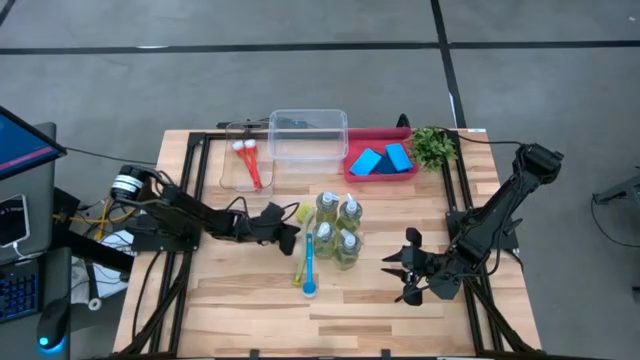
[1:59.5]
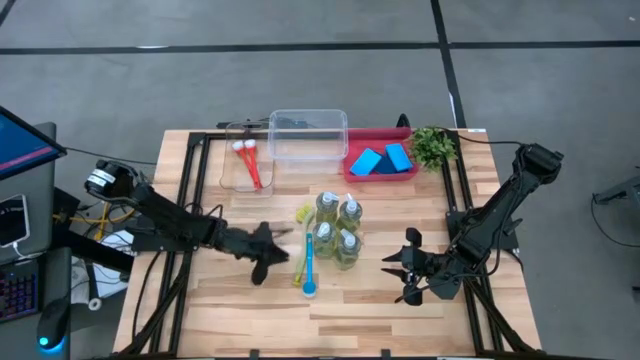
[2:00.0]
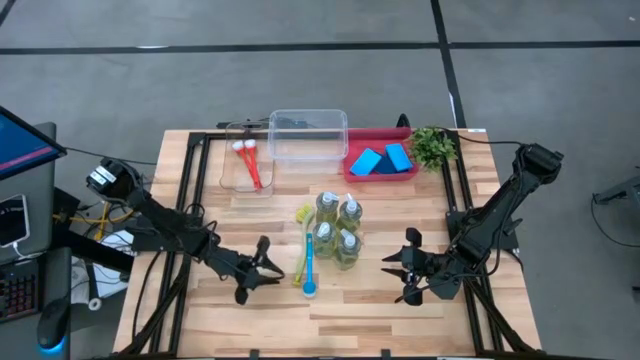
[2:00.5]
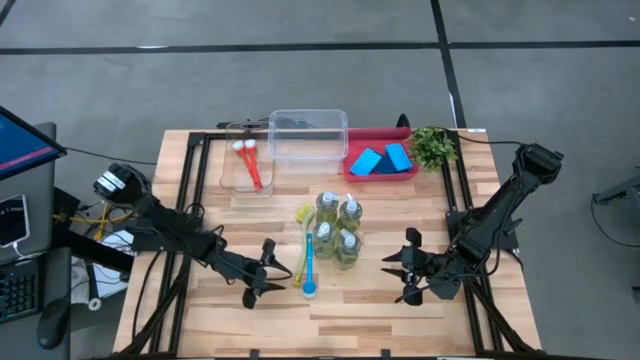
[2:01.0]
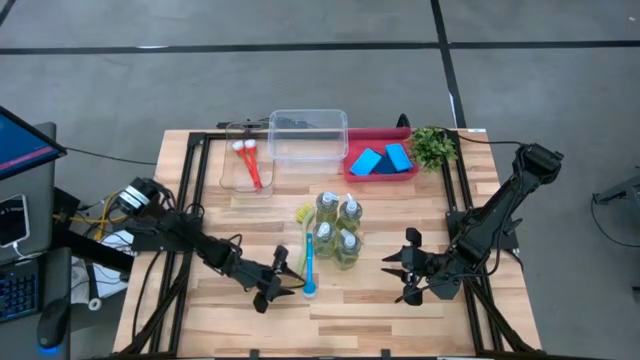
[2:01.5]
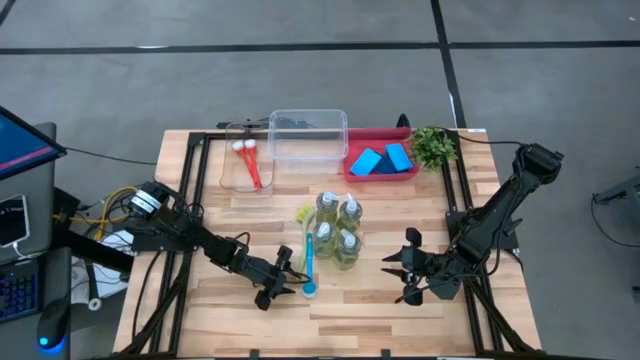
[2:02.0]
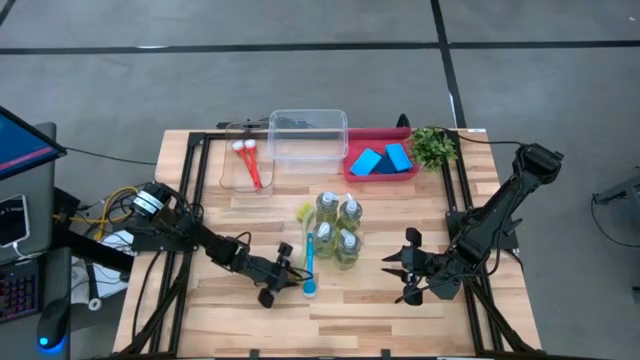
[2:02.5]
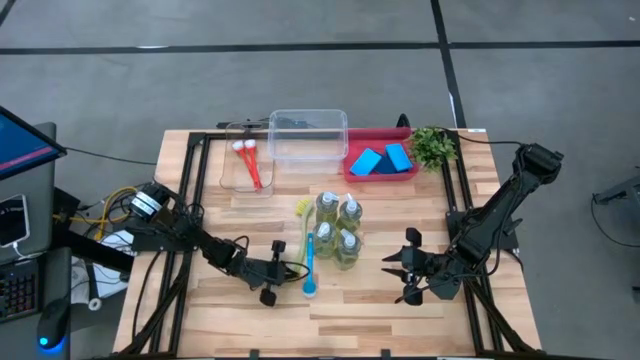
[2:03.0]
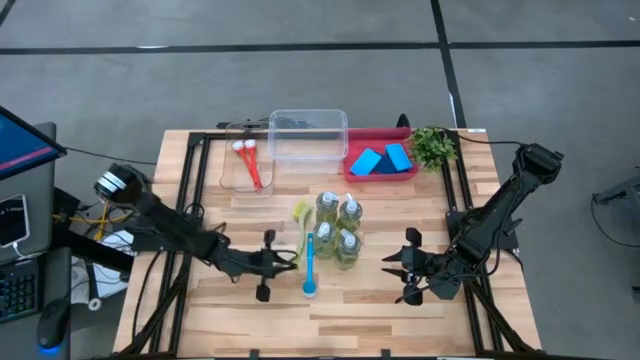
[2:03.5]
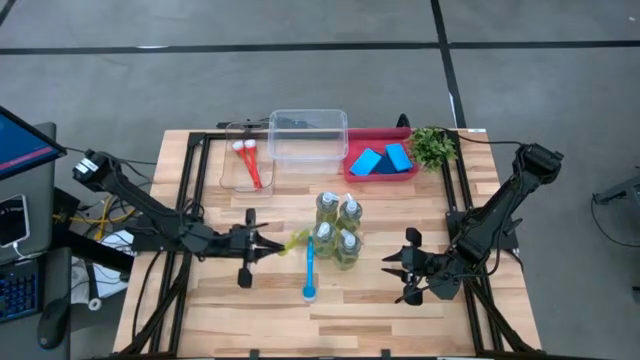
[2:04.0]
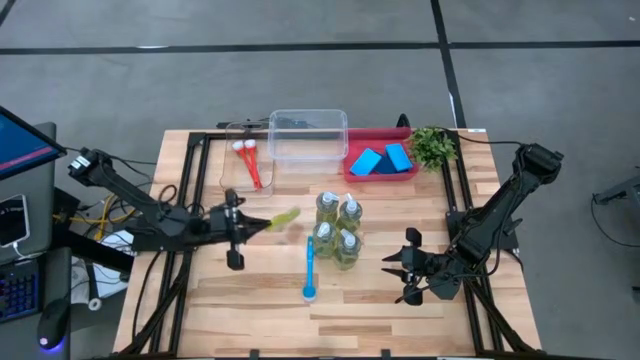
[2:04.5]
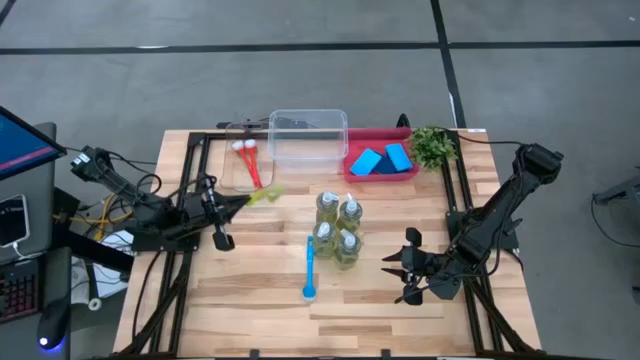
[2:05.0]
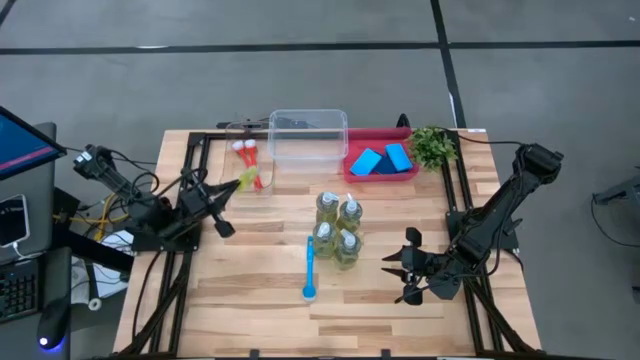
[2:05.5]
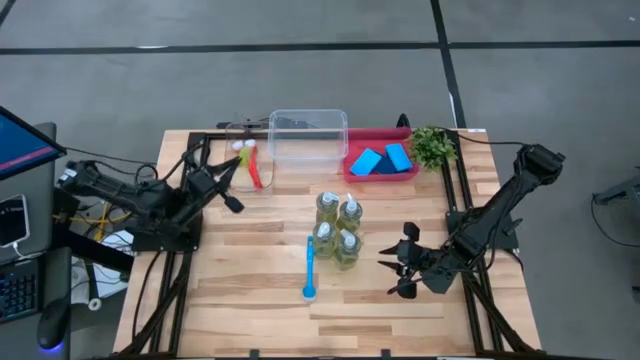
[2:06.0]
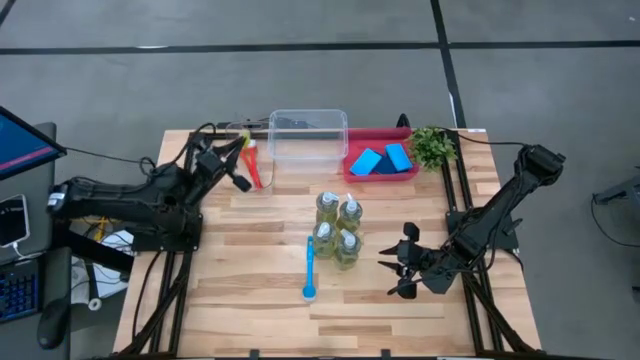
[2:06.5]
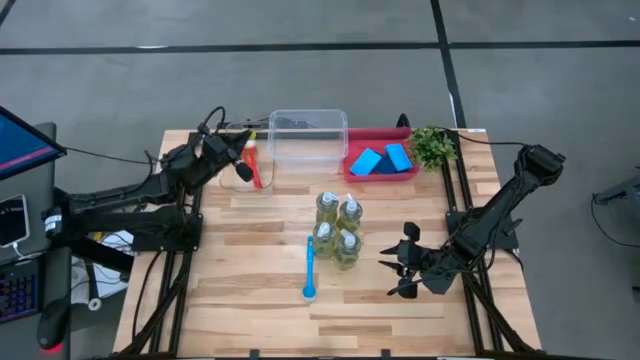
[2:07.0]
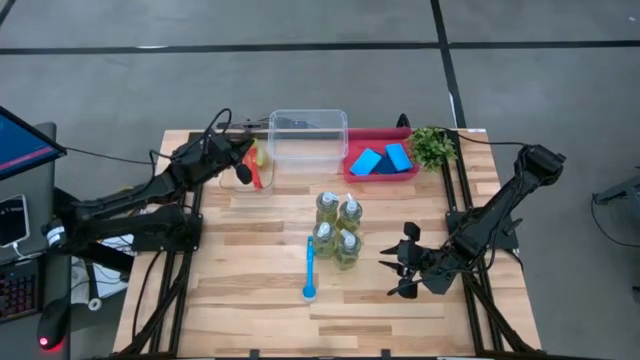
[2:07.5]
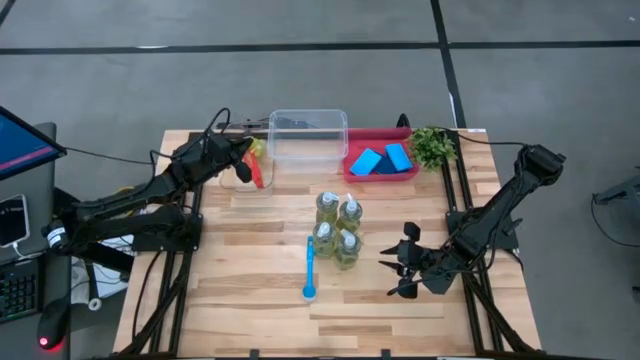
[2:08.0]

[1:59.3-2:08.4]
Task: Pick & Place Kitchen Sink Supplies
Put the light green dish brush into the left transparent bin

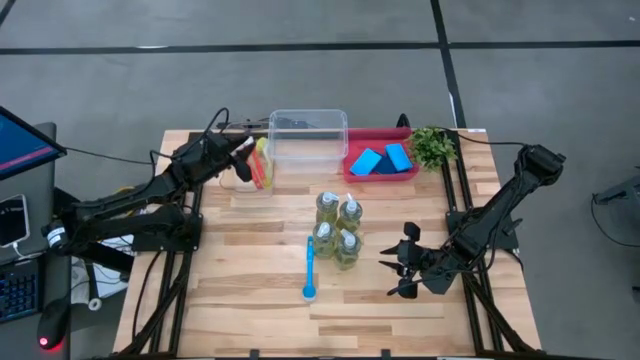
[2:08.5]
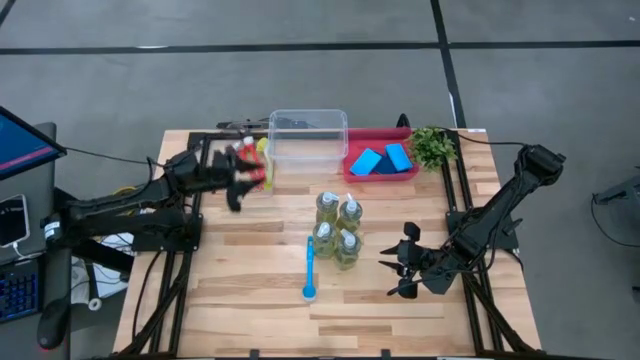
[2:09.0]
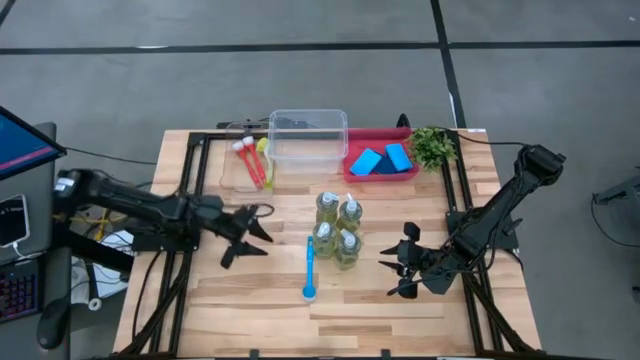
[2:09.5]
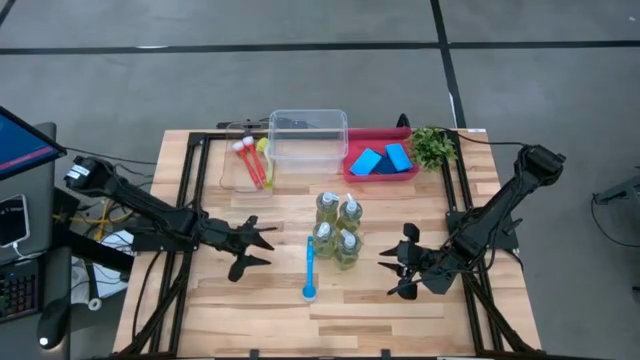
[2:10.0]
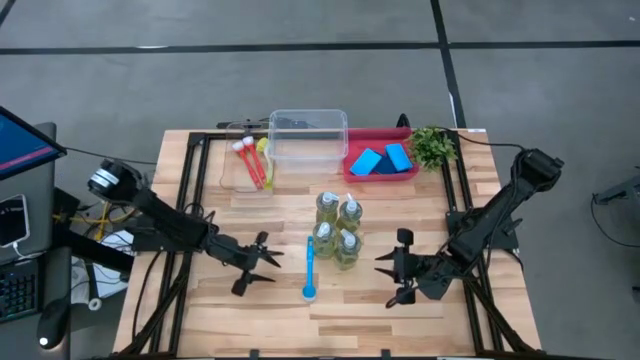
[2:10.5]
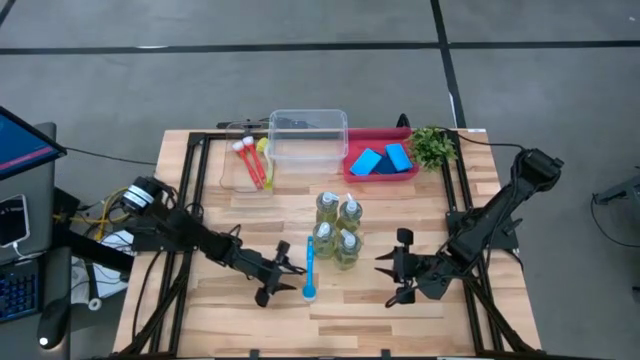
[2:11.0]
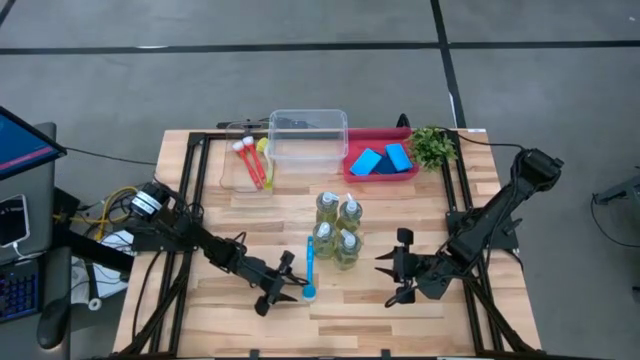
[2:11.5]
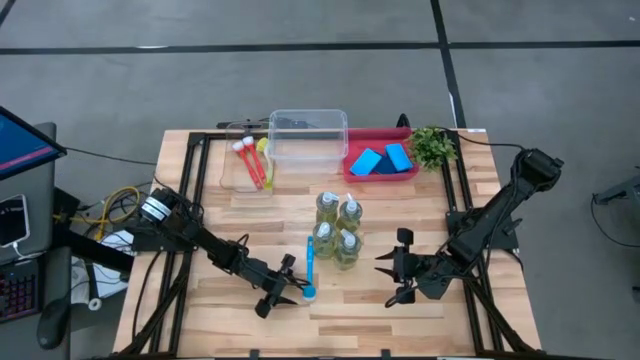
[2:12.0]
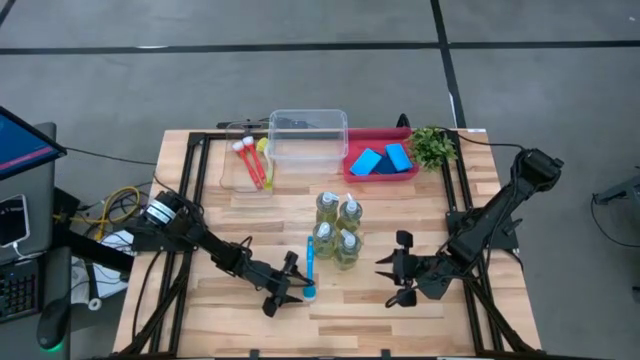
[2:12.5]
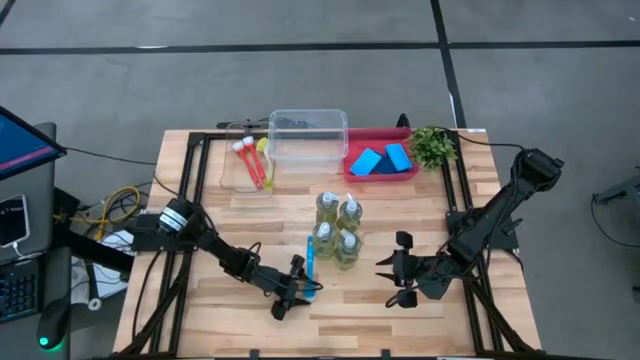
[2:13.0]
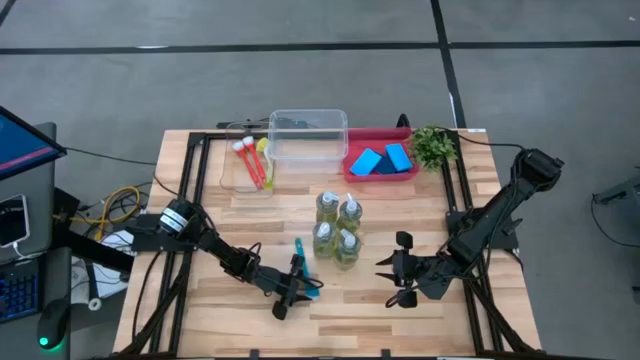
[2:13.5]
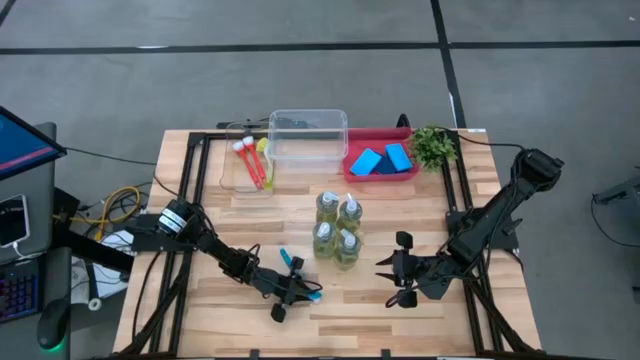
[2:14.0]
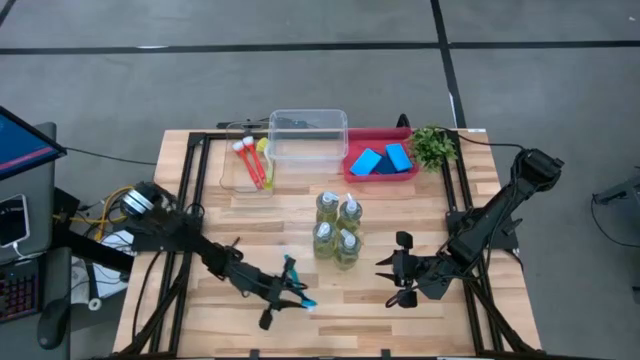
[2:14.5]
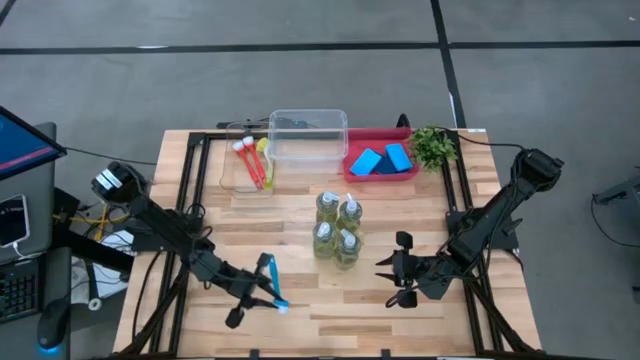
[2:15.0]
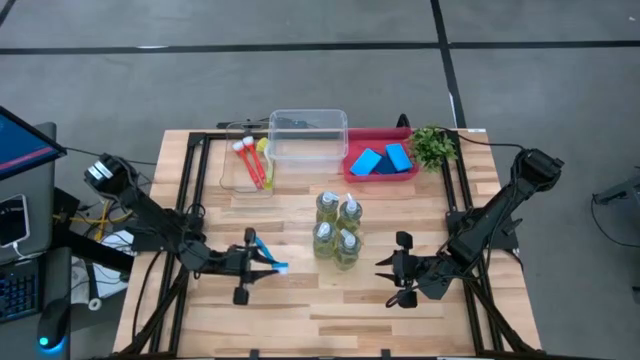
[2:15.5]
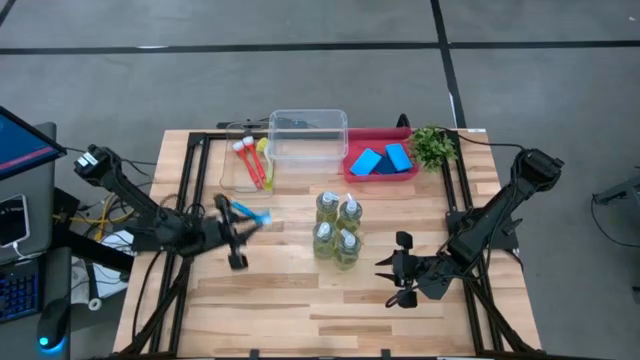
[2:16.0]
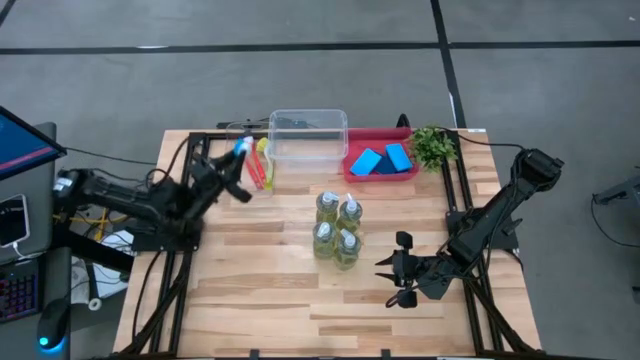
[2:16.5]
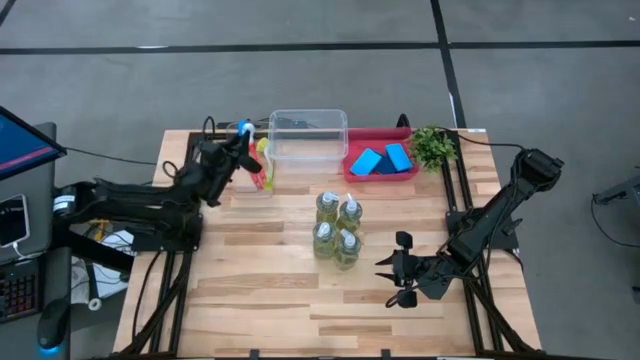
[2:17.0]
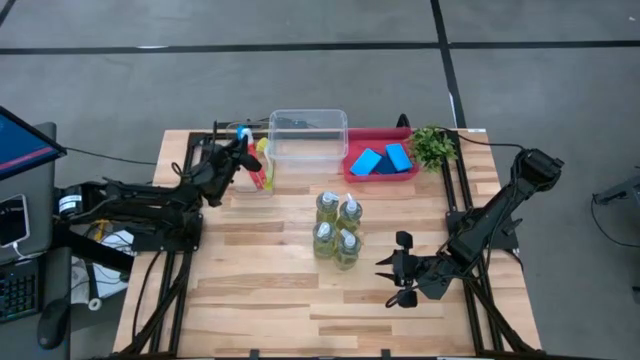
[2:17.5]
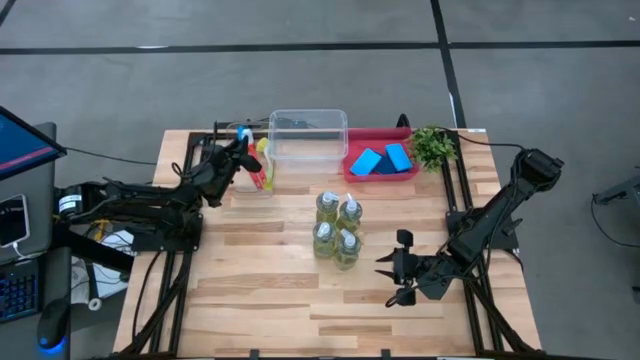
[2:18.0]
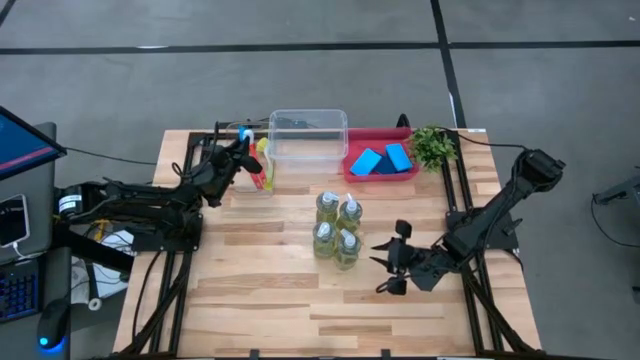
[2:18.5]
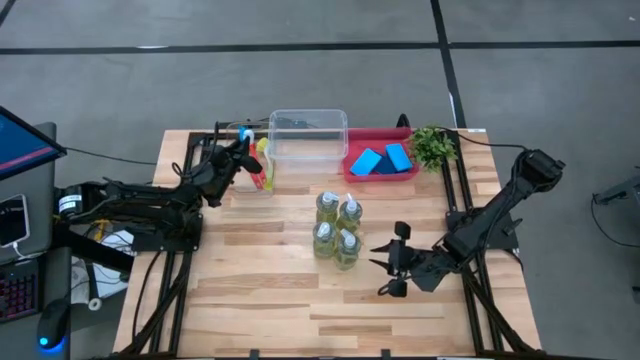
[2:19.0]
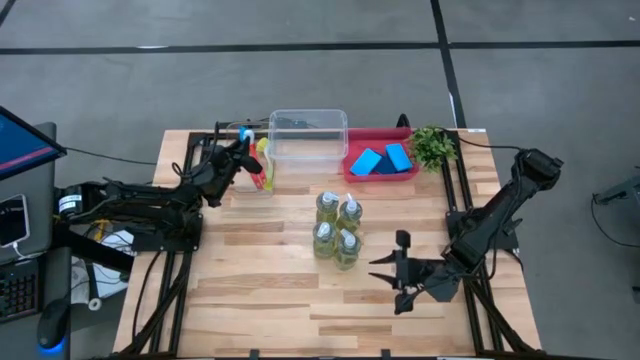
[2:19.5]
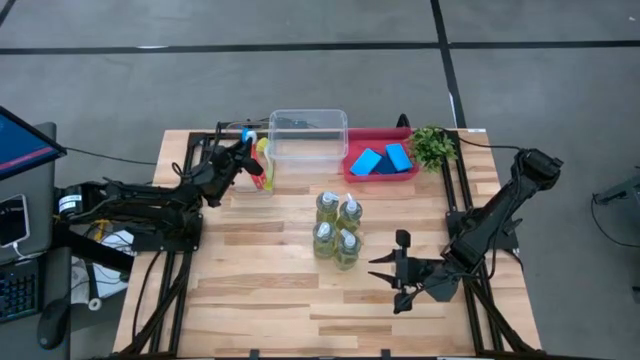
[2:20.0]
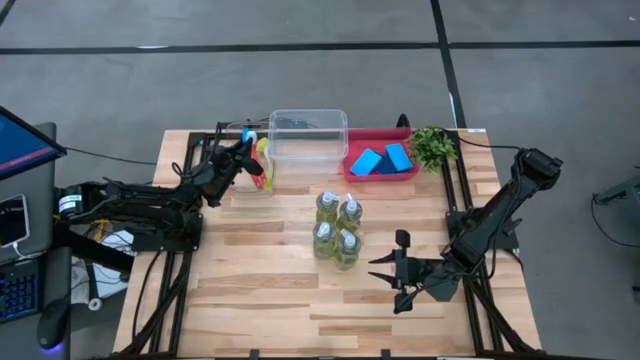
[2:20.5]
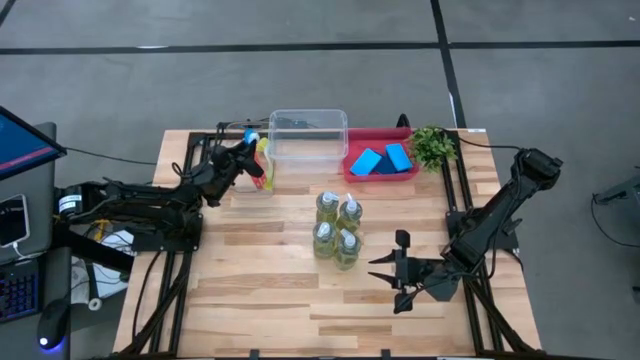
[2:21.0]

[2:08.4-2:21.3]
Put the blue dish brush into the left transparent bin
